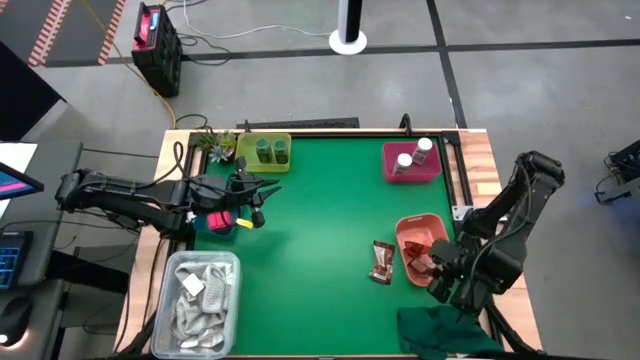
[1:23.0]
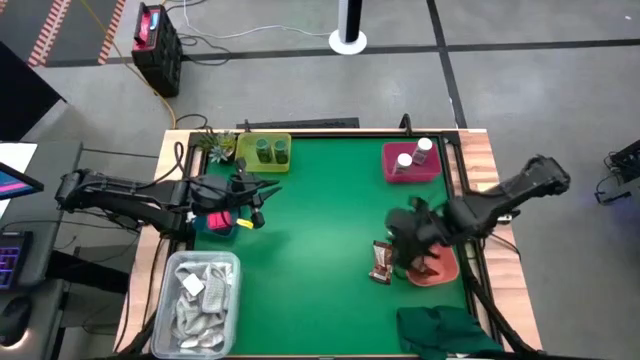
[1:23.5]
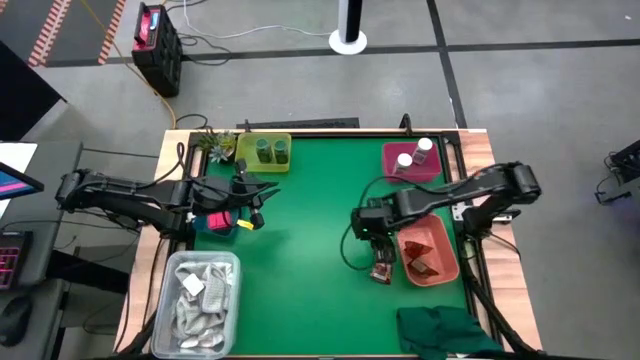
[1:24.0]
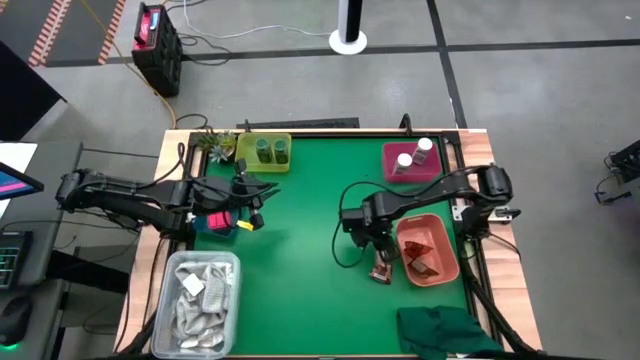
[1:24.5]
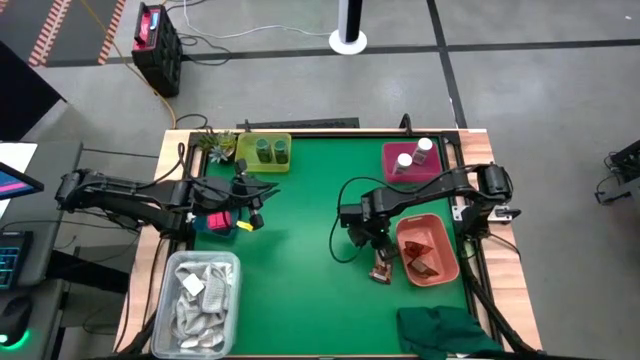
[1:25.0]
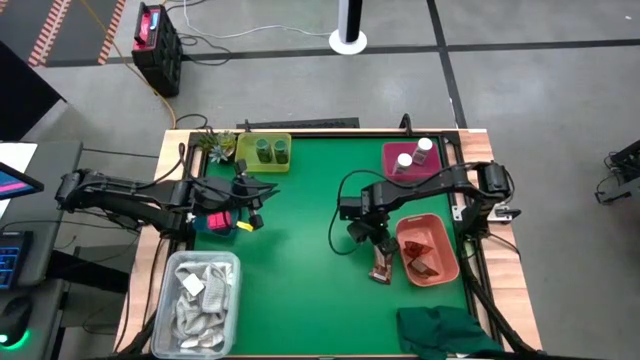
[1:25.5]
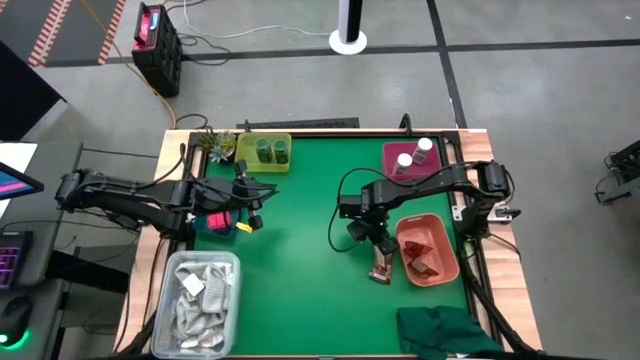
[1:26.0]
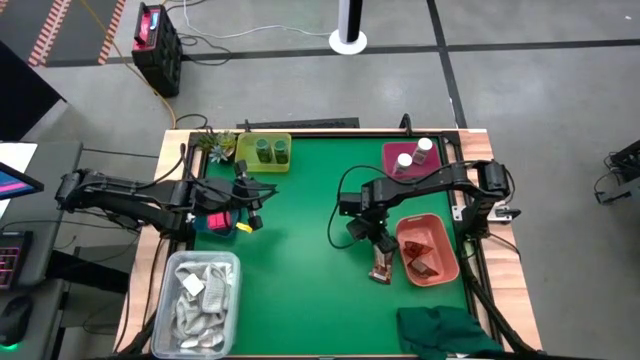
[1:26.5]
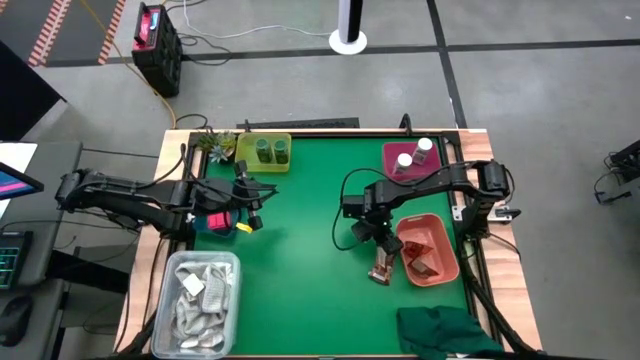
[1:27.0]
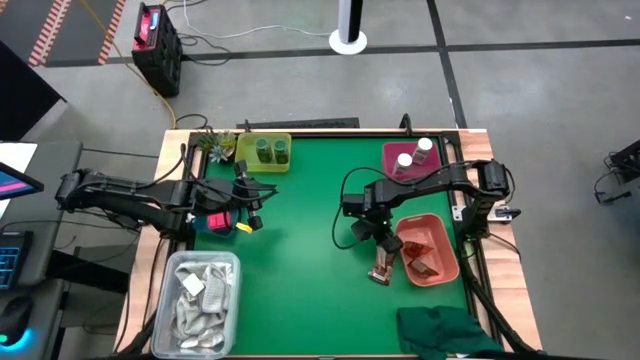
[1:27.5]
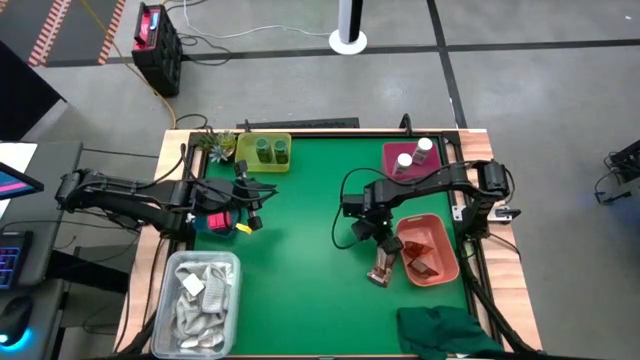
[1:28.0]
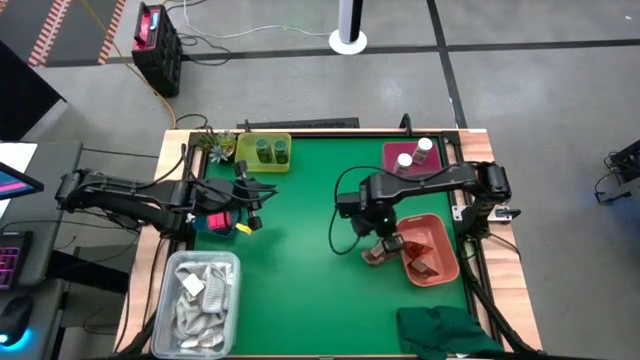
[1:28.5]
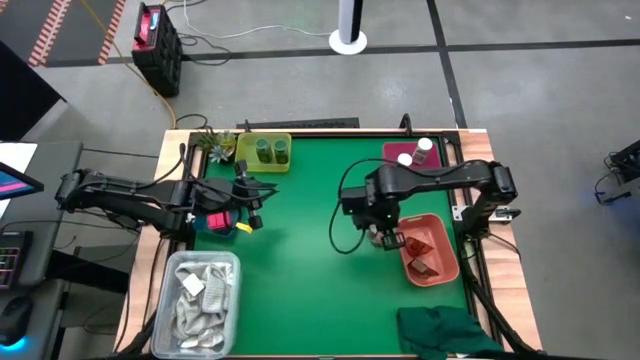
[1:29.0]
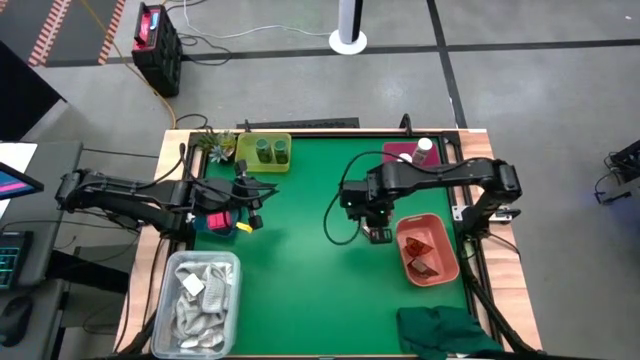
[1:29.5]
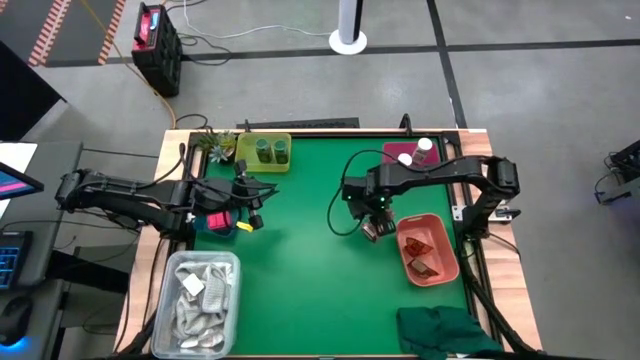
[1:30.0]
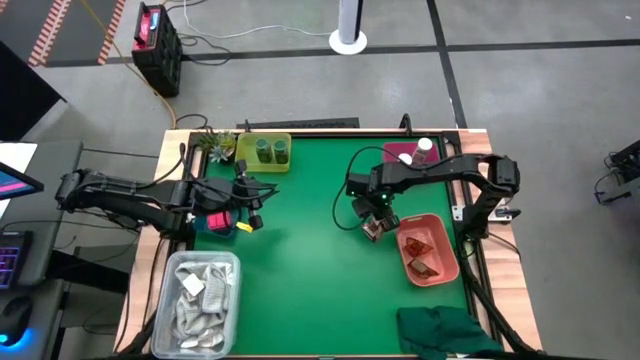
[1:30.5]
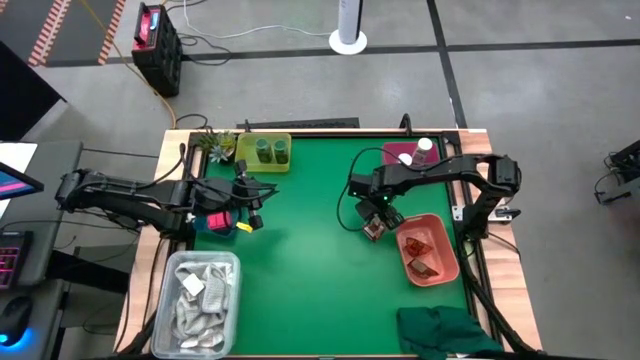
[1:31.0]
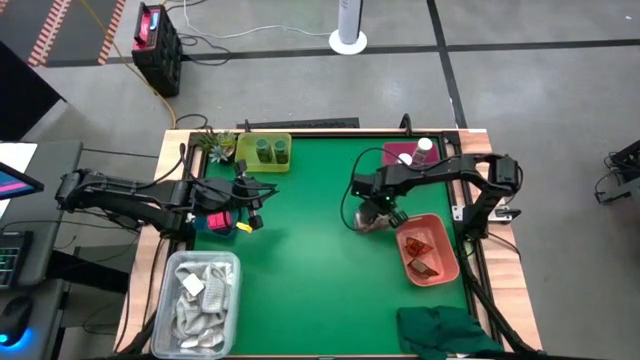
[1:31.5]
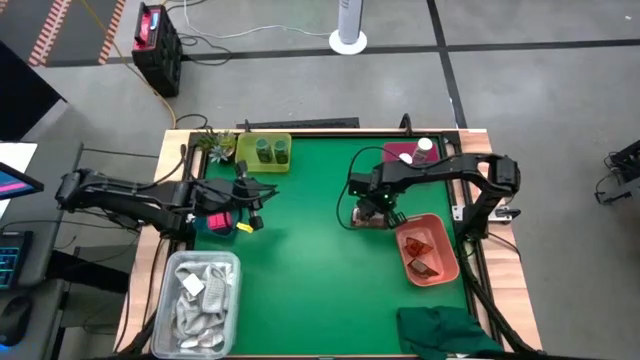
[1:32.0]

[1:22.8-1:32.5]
Task: Sort spices by type
Put the orange seasoning pack into the orange bin

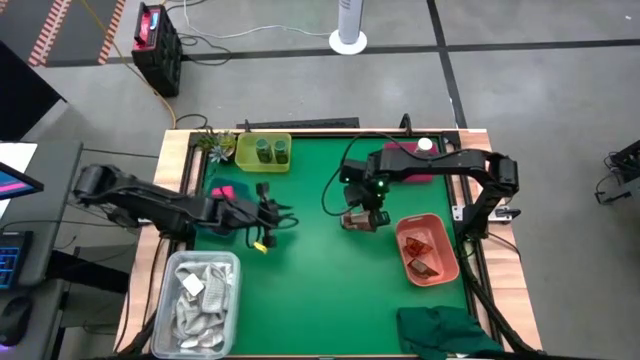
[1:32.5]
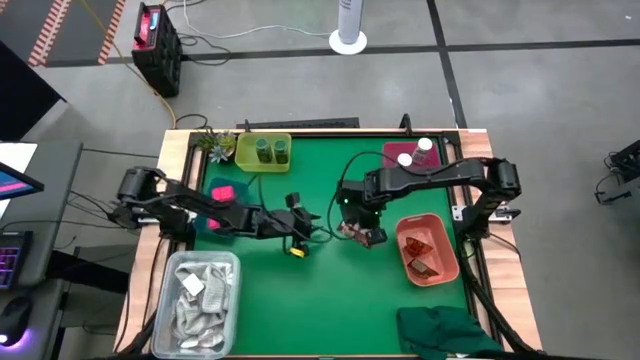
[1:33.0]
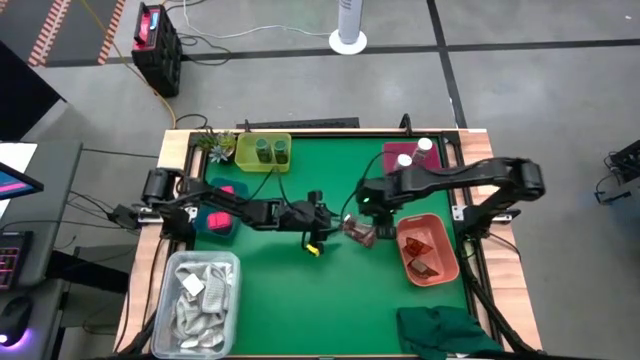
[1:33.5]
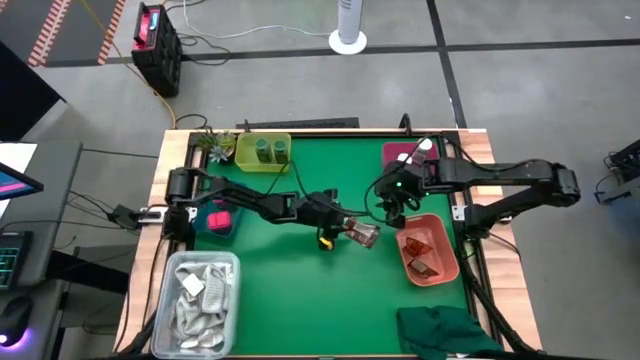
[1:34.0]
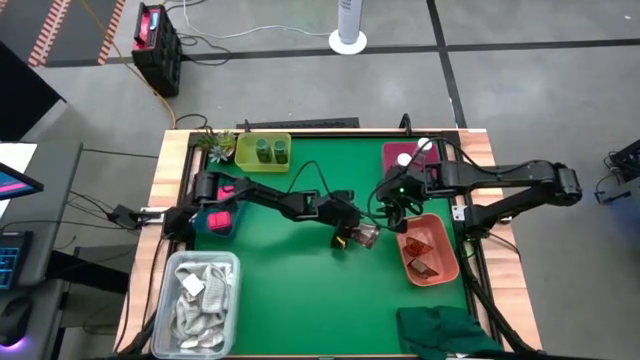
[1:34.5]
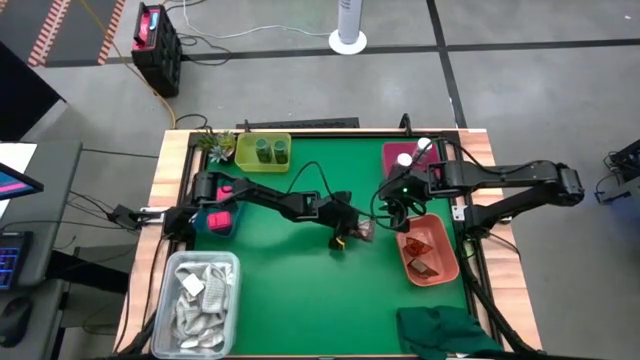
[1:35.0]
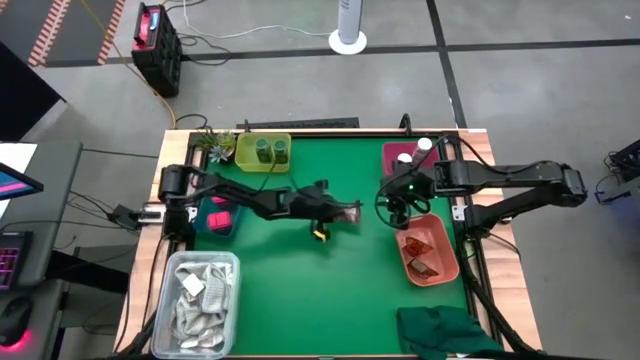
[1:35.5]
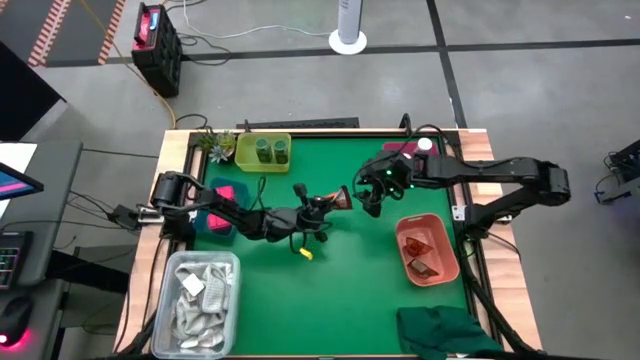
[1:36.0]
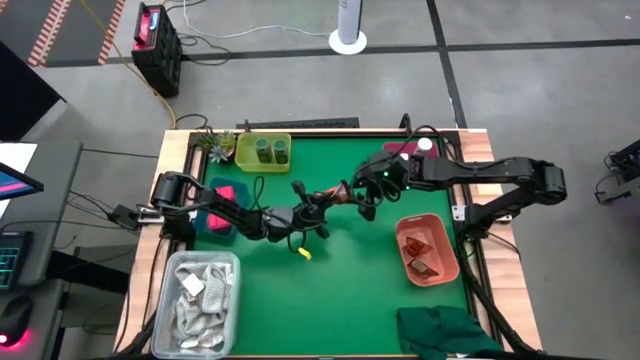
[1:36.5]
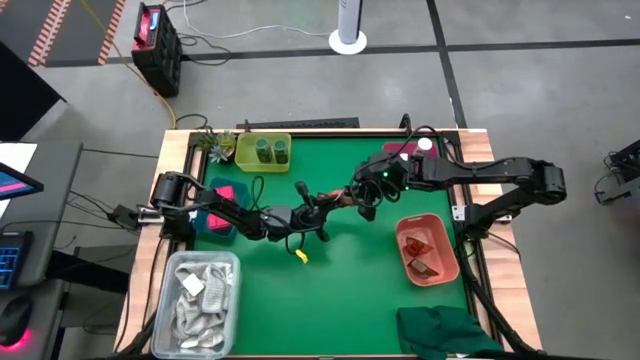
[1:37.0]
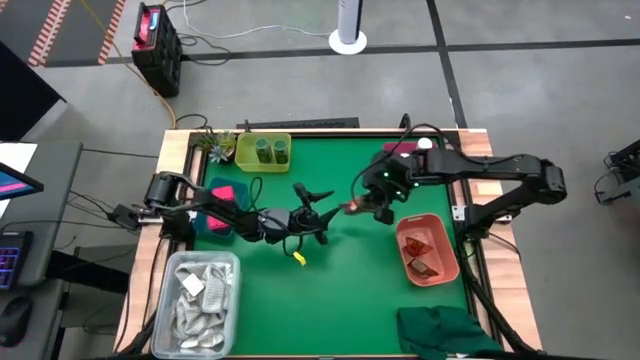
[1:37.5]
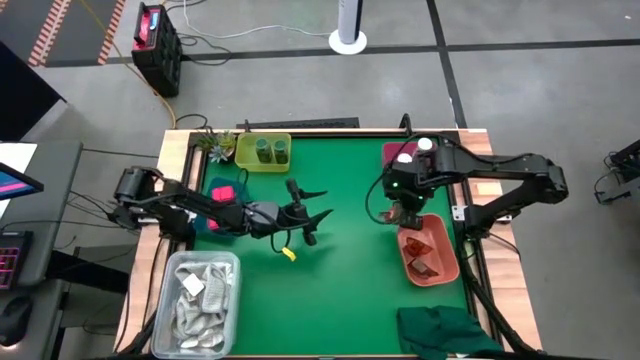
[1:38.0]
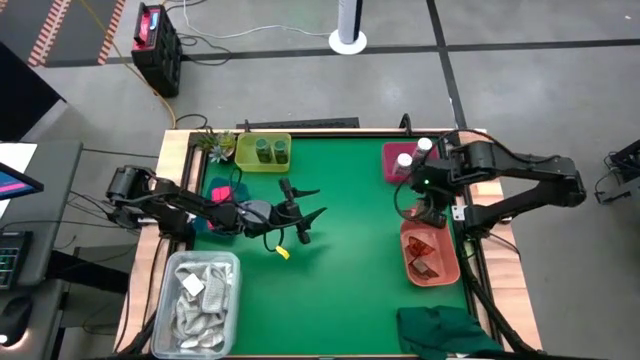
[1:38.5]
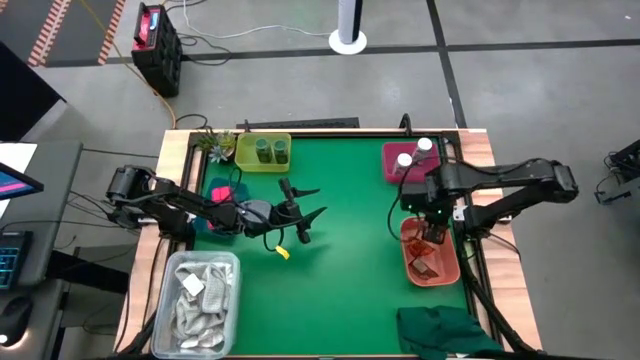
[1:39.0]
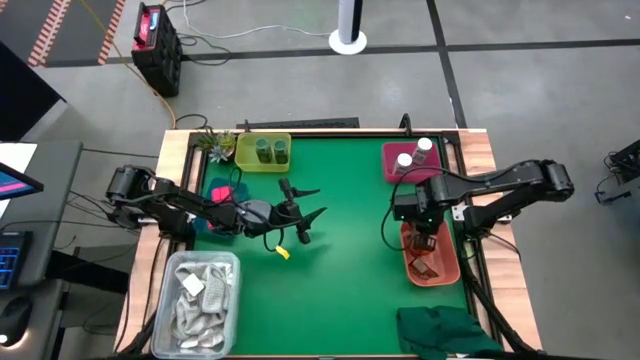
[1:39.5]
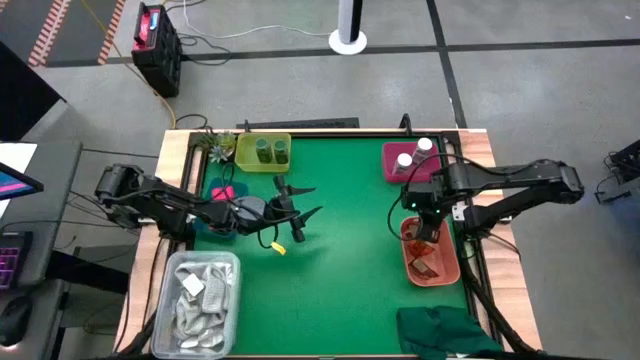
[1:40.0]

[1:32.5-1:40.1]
Put the orange seasoning pack into the orange bin

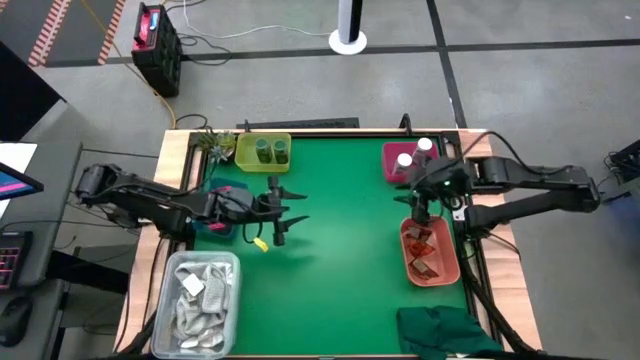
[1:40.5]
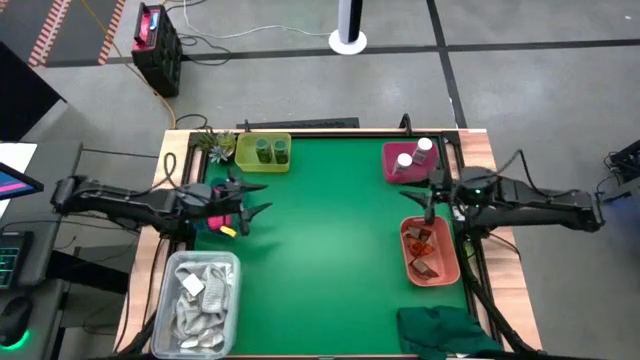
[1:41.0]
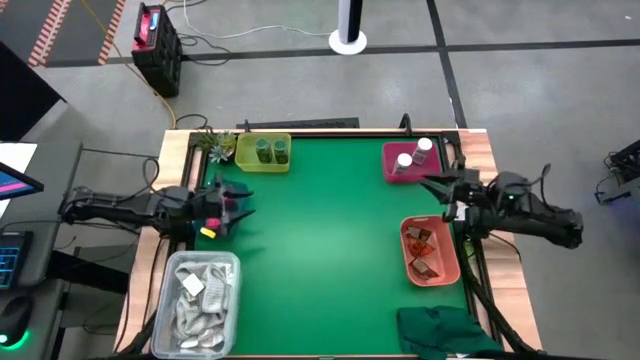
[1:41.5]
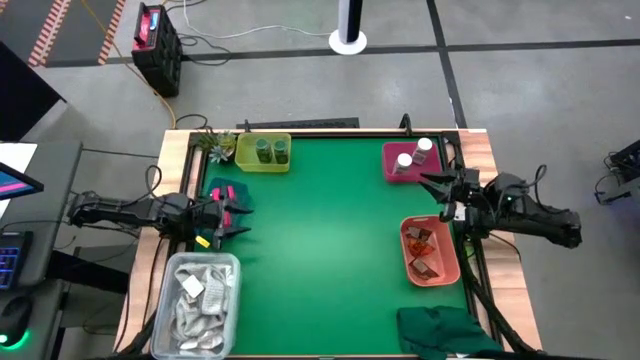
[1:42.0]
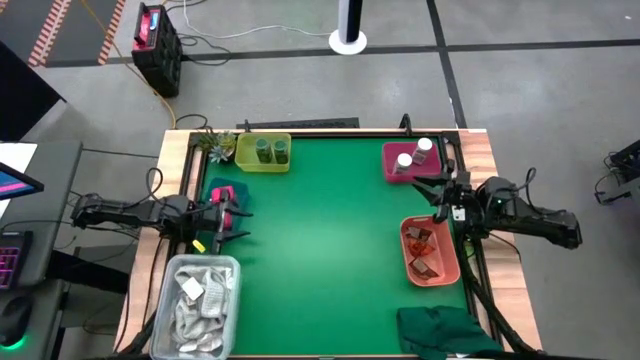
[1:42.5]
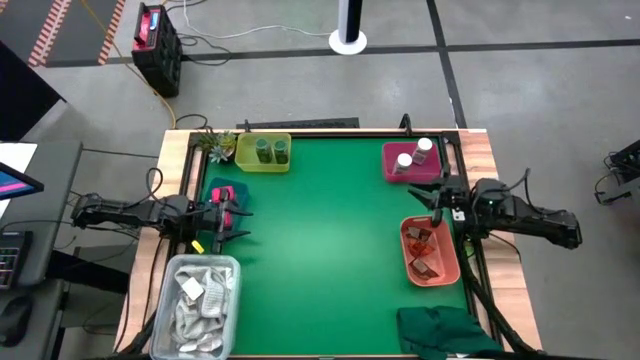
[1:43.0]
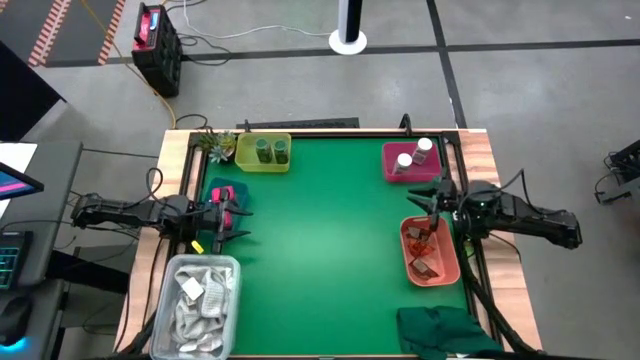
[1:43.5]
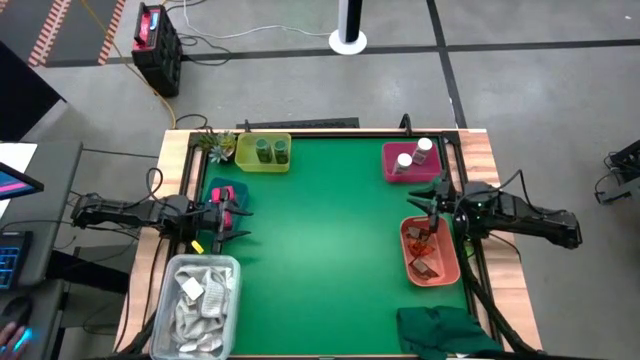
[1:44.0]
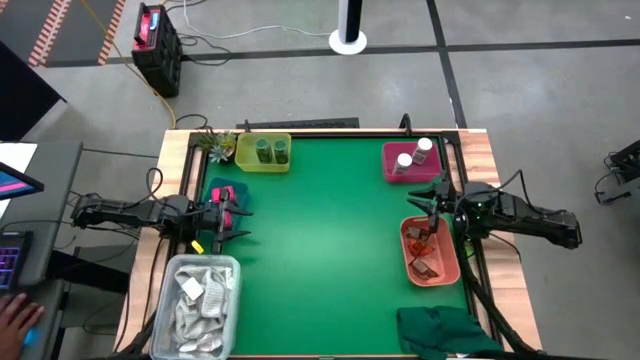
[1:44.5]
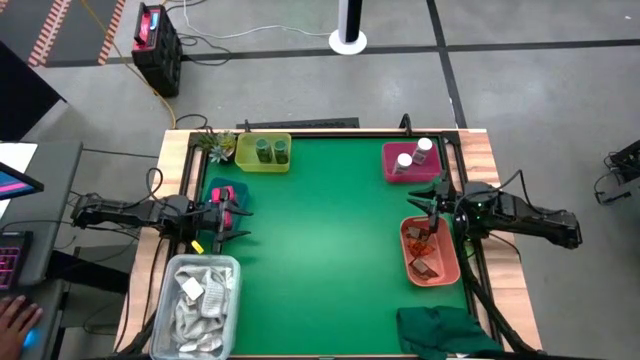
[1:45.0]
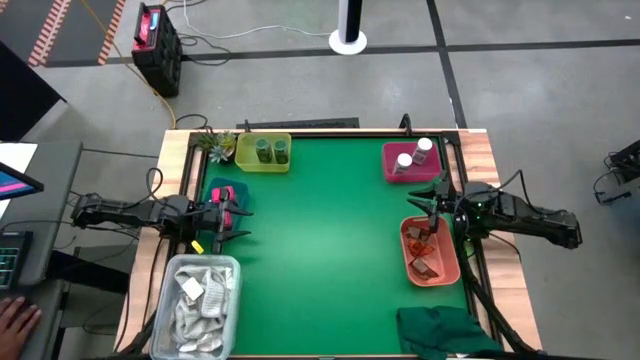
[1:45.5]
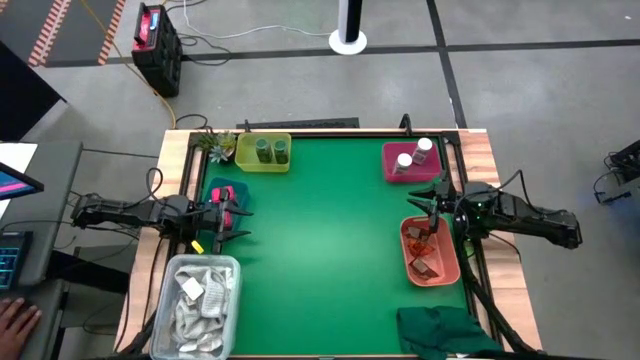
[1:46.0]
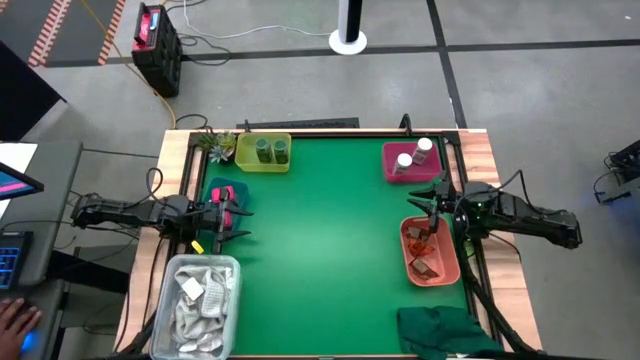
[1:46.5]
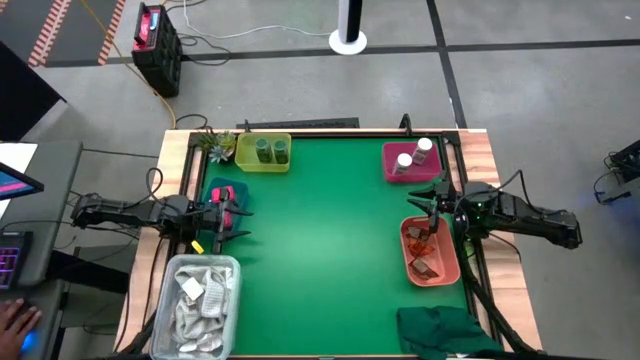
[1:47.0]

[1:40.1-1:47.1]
Return to Home Position
